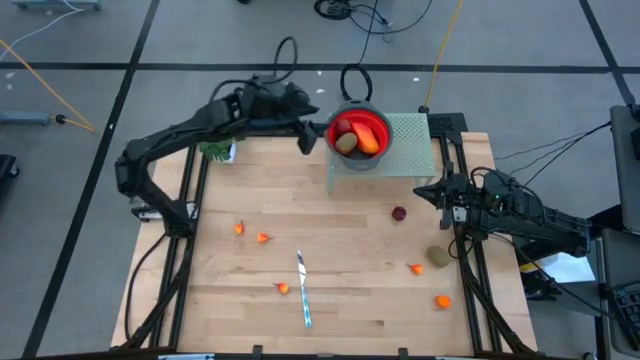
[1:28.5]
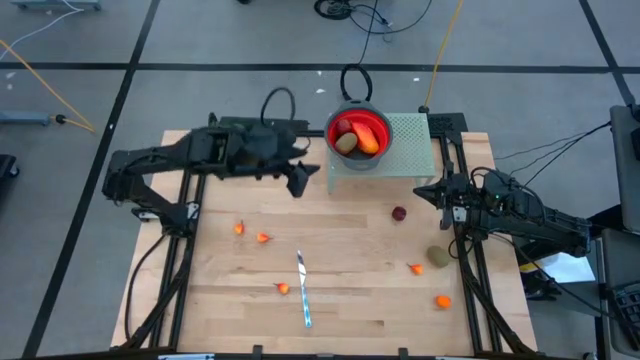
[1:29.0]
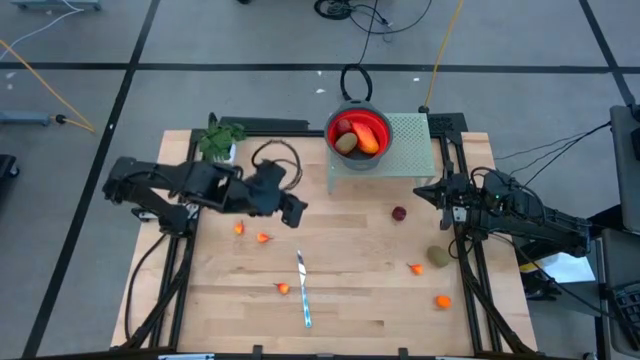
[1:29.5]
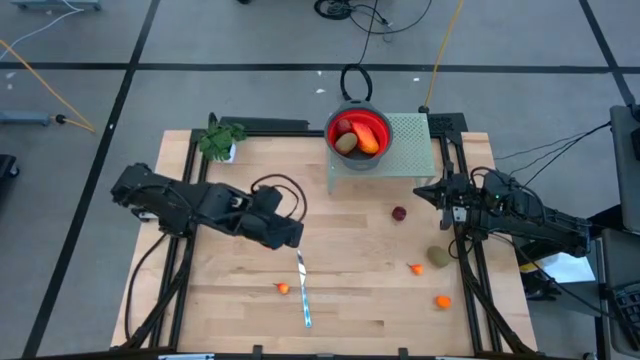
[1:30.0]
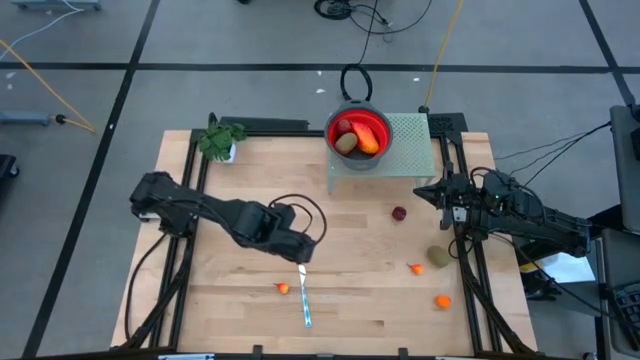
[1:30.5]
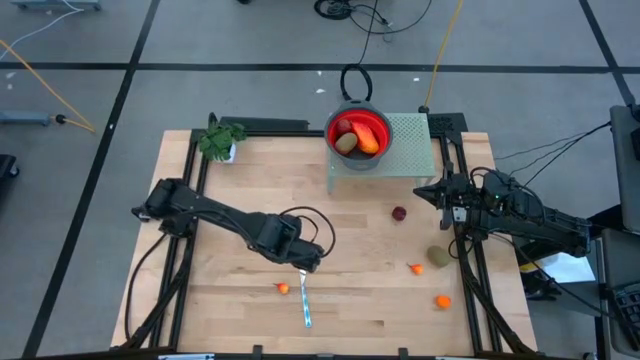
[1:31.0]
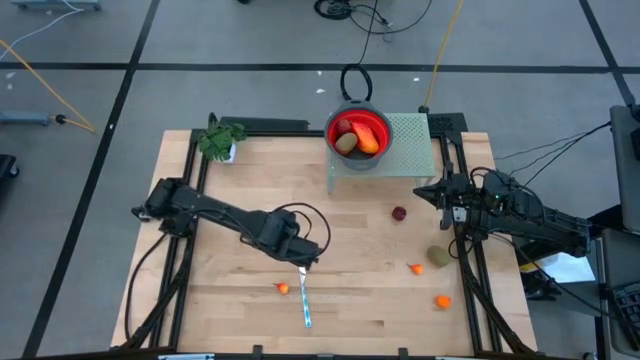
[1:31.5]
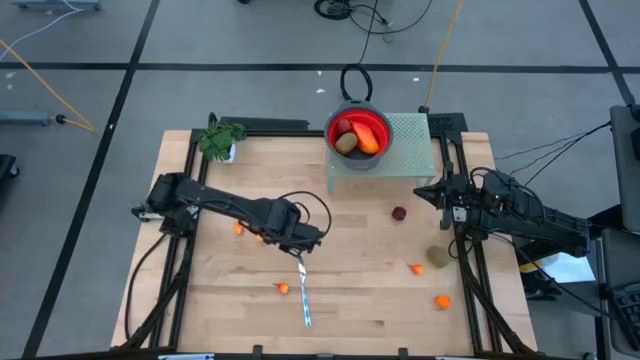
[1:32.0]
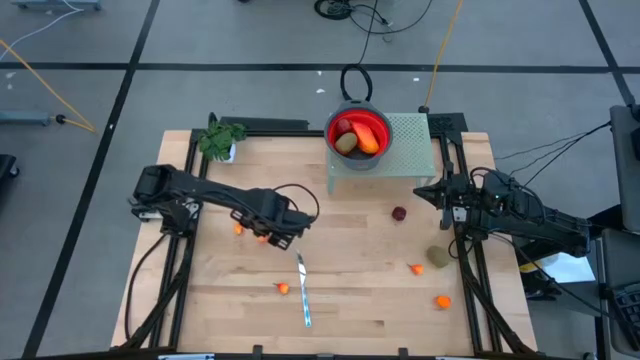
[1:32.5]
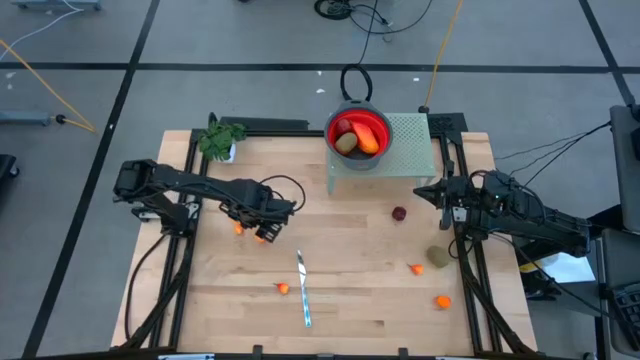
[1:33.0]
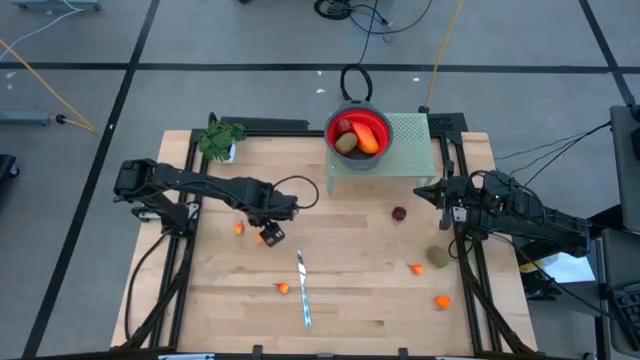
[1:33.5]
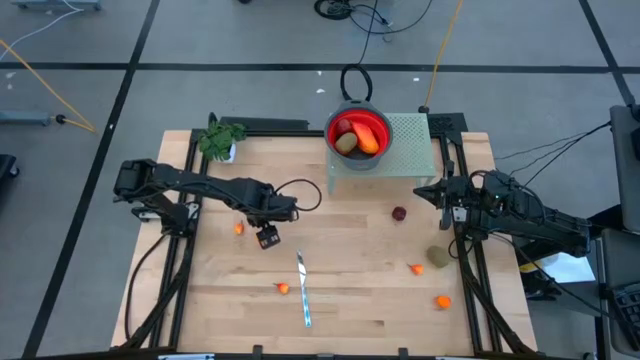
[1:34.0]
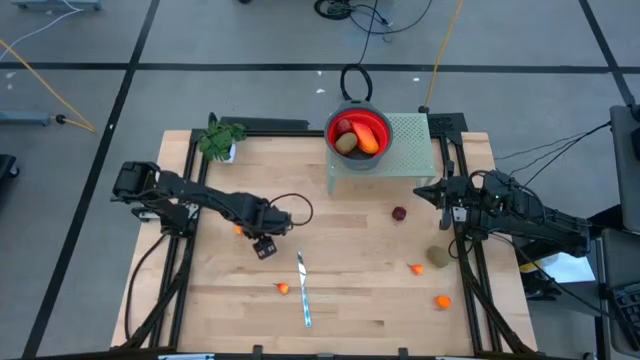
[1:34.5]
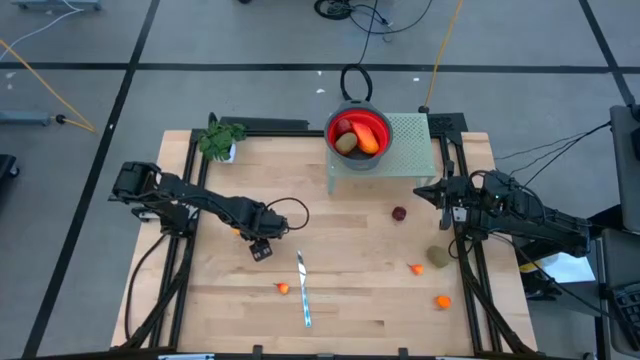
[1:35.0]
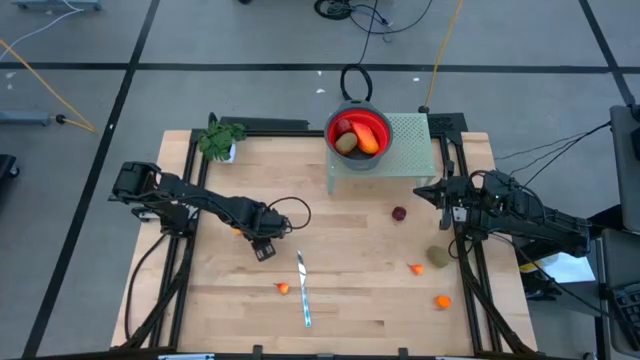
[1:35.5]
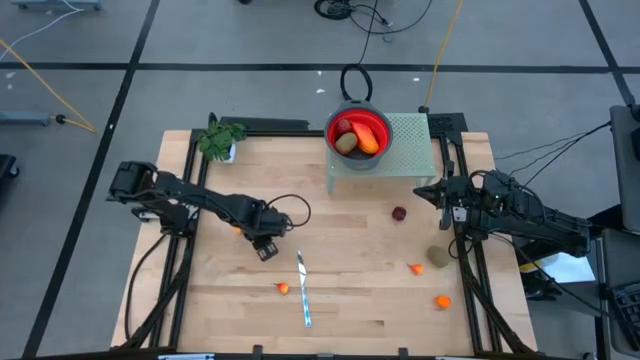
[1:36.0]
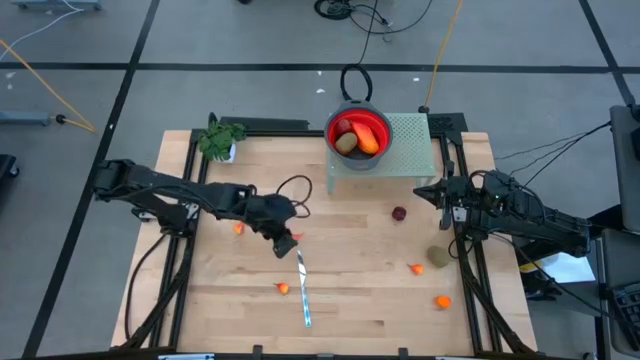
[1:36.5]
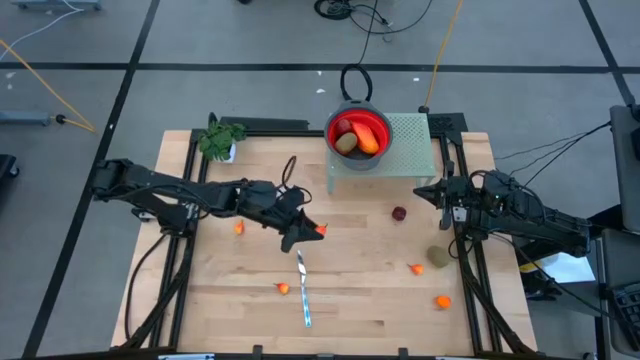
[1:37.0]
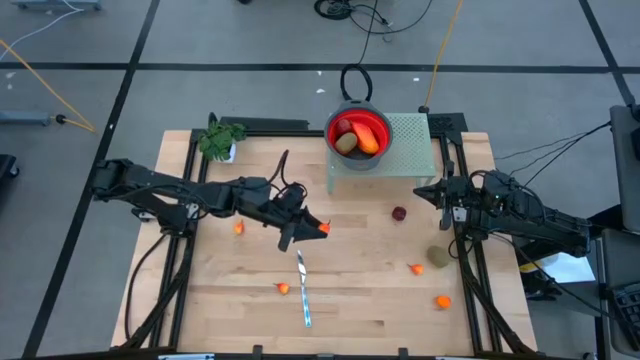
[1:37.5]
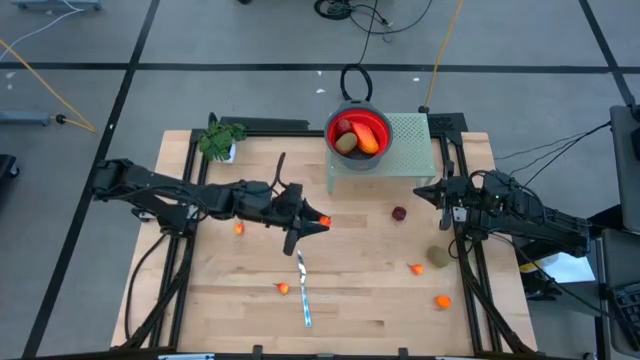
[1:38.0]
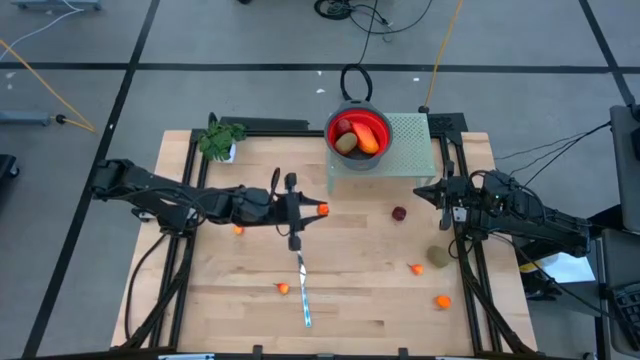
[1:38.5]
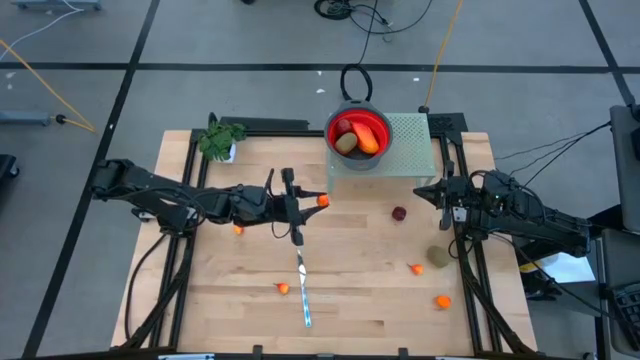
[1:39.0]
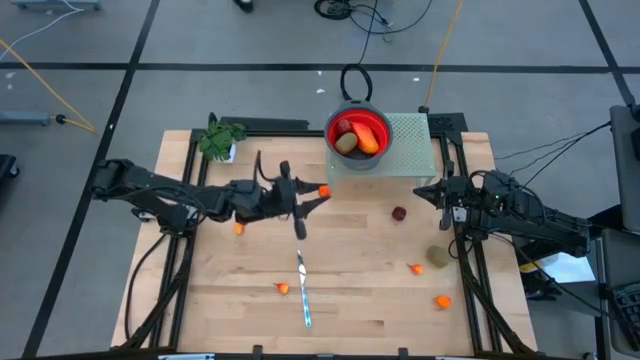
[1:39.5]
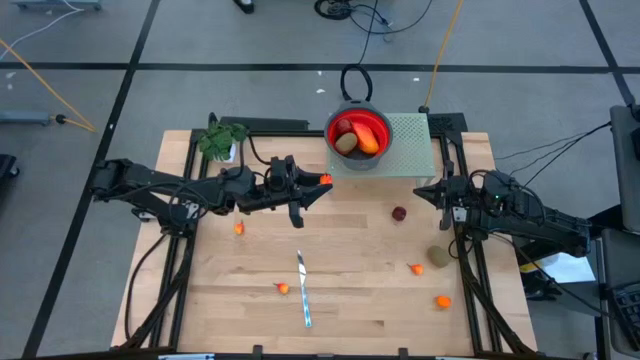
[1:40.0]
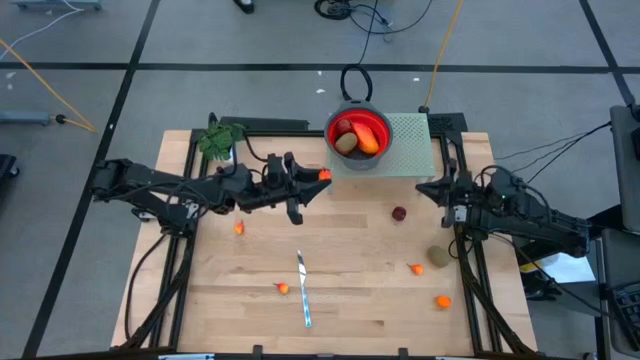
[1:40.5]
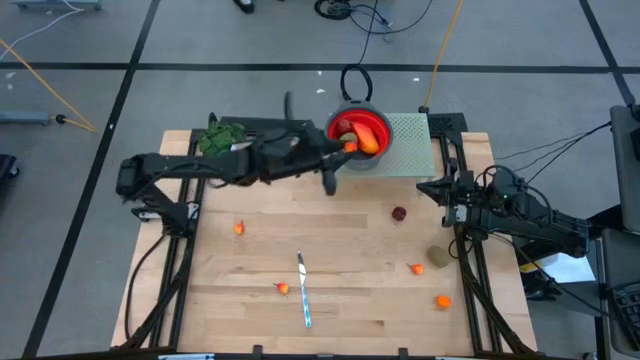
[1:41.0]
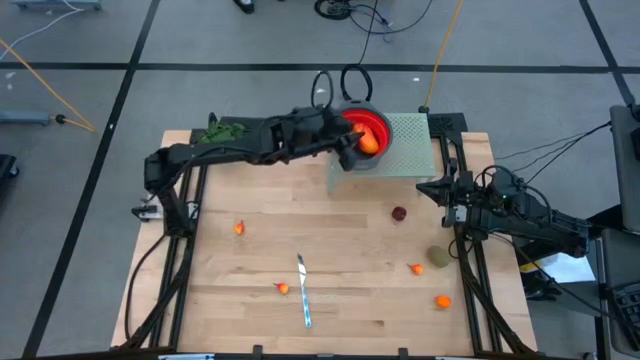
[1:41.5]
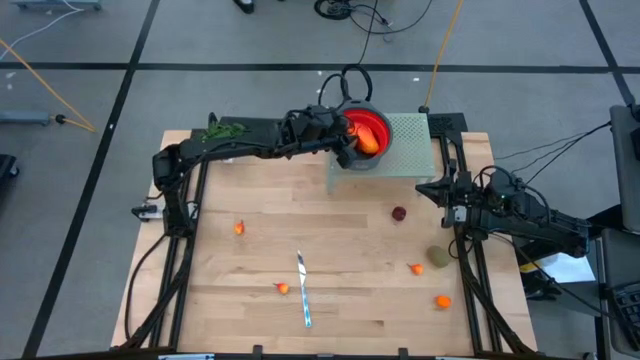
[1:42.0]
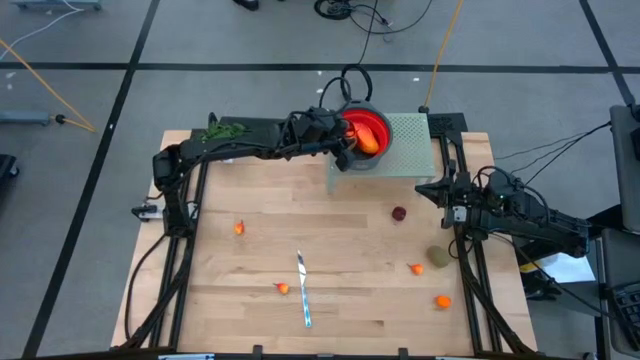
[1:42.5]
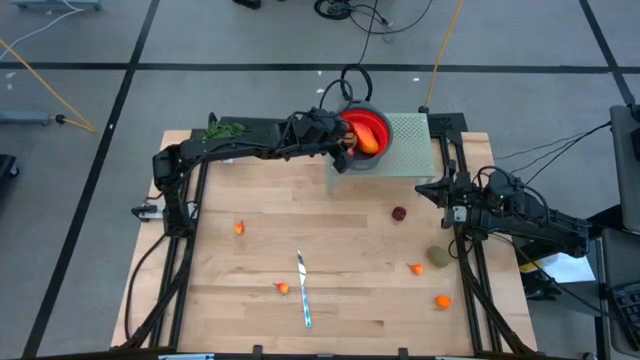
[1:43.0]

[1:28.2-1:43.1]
Task: Pick & Place Fruit
Put the peach into the red strainer bowl on the shelf

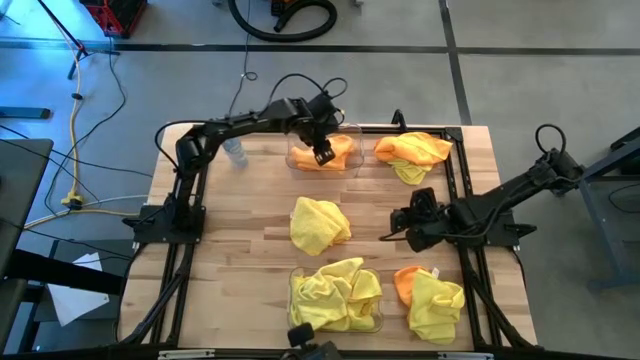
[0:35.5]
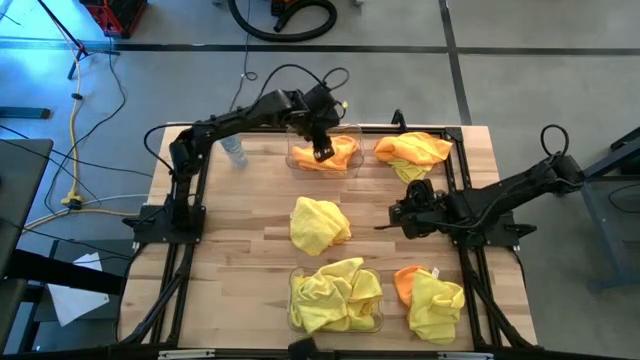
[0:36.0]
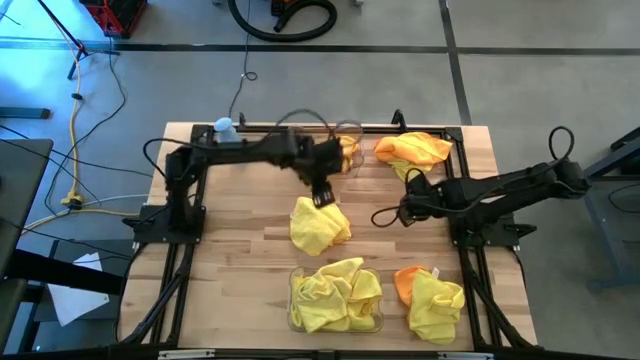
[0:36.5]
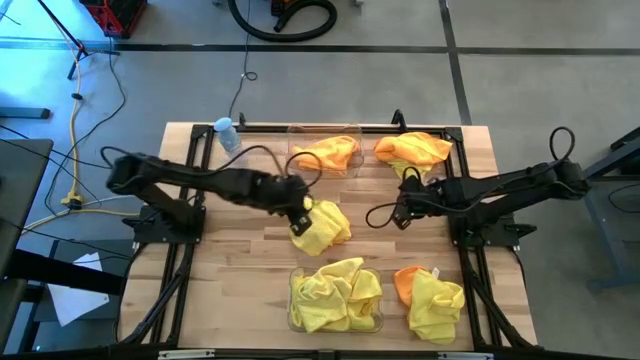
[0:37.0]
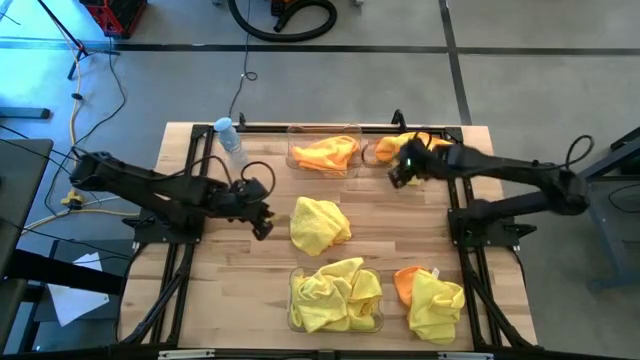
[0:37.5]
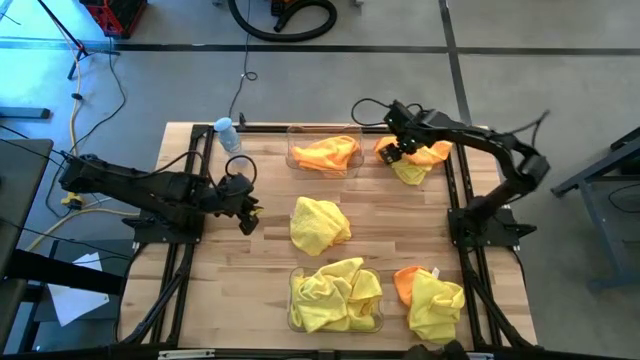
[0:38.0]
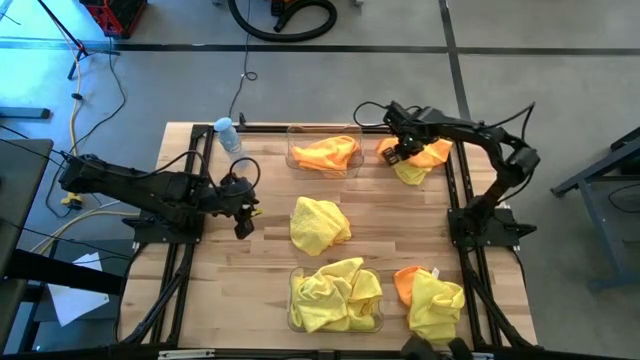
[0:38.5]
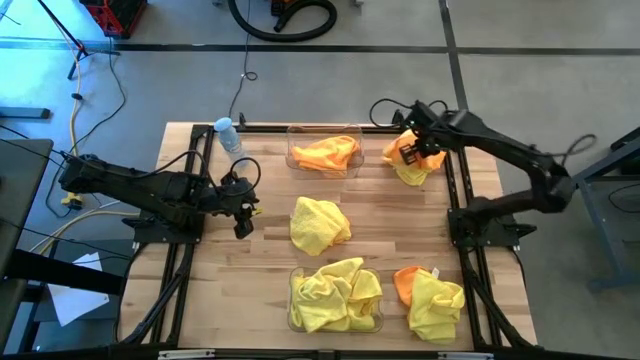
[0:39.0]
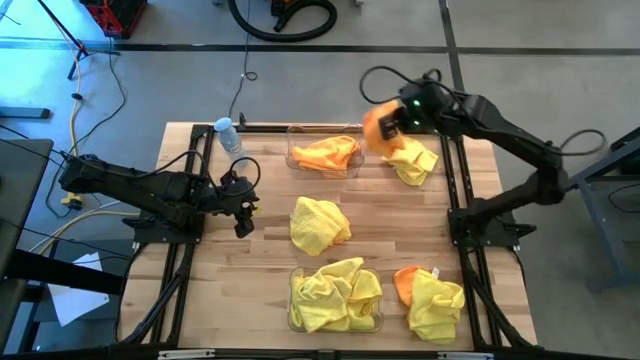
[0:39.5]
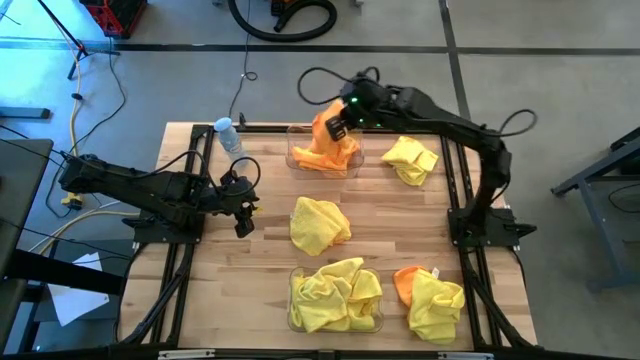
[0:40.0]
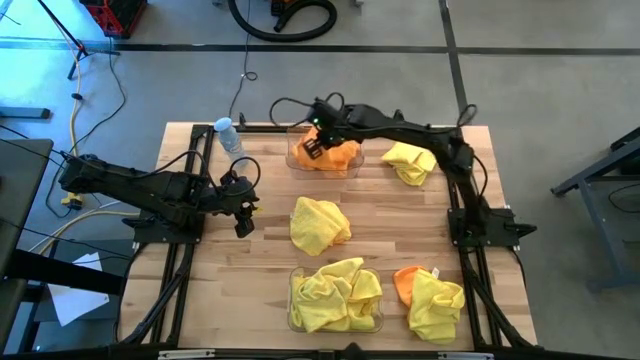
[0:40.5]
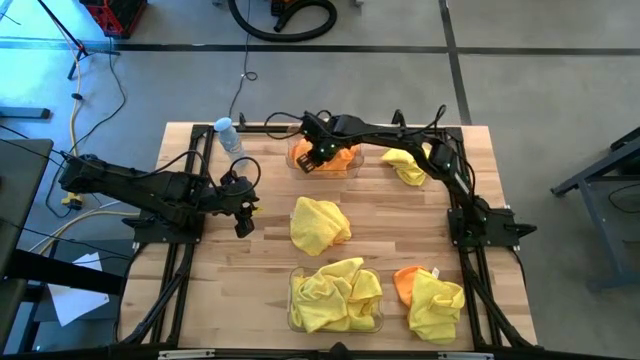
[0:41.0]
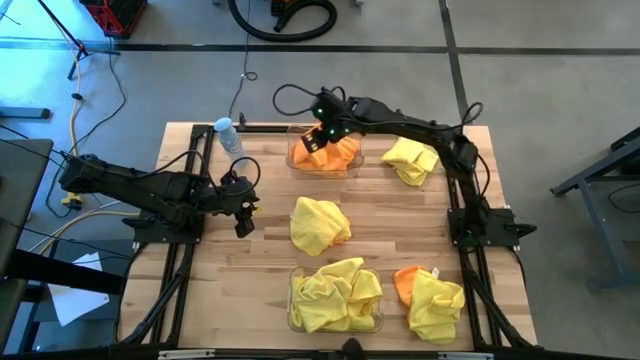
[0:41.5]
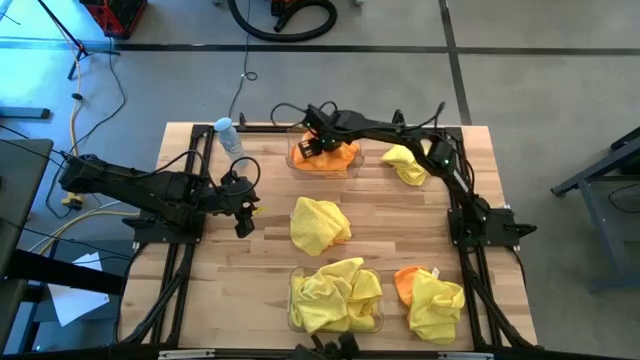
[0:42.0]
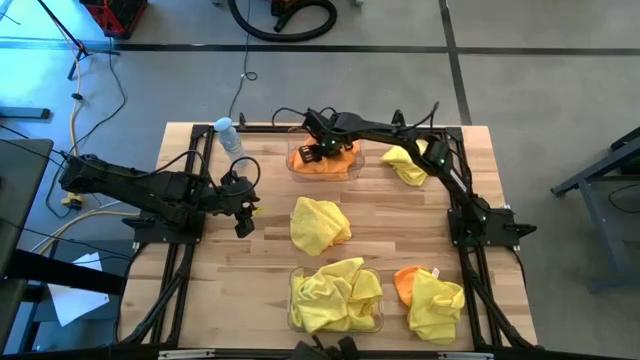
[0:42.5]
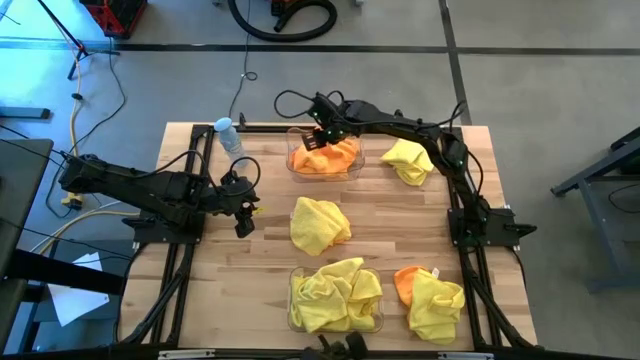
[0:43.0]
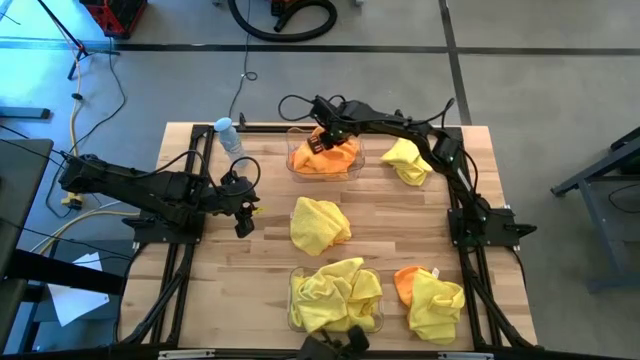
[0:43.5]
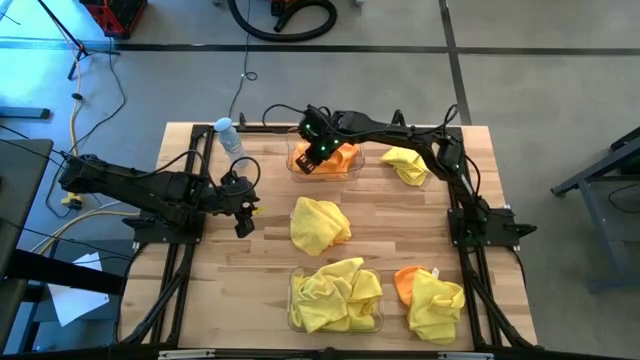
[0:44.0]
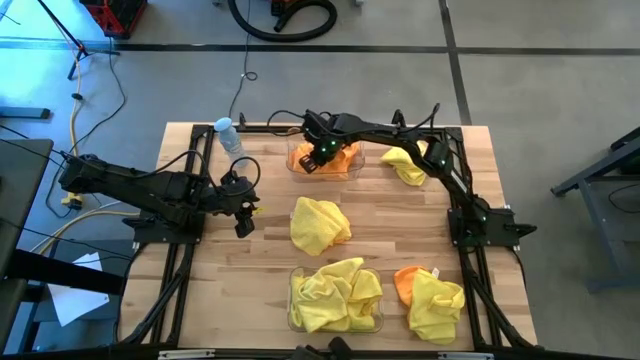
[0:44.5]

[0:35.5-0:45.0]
Task: Sort microfiber towel by color & place in baskets
Put the orange microfiber towel into the top transparent bin
